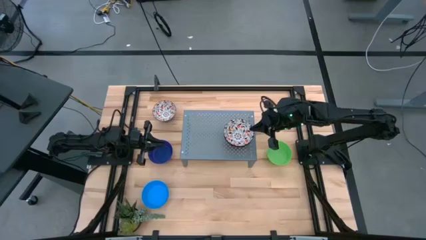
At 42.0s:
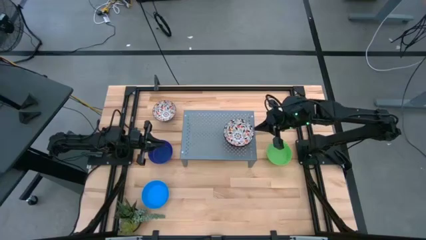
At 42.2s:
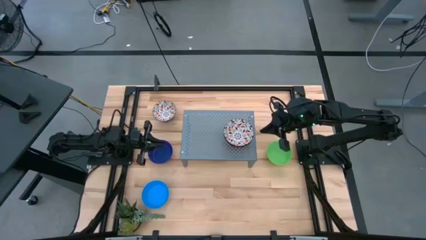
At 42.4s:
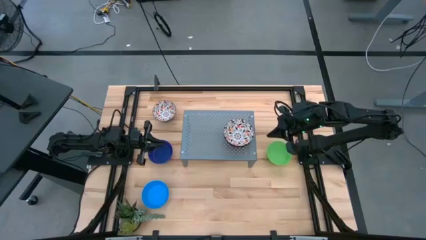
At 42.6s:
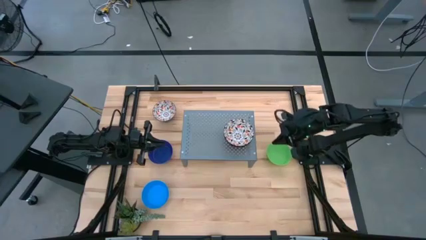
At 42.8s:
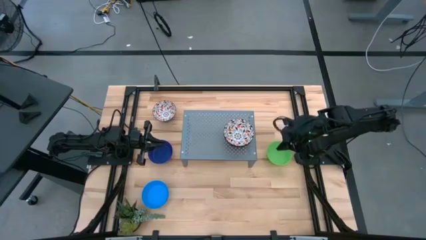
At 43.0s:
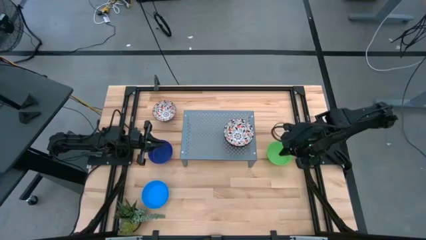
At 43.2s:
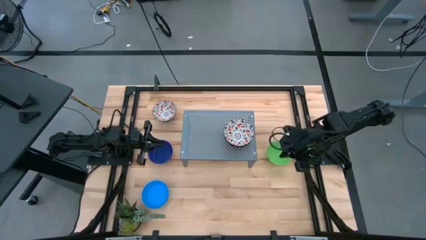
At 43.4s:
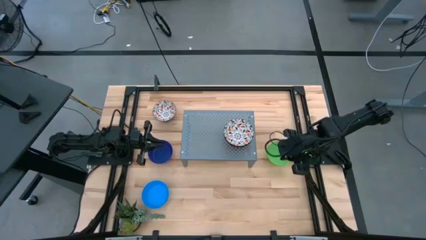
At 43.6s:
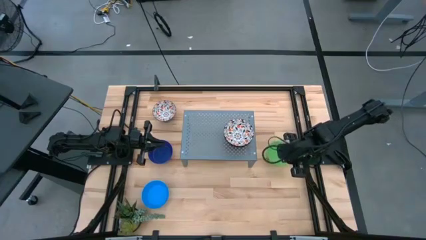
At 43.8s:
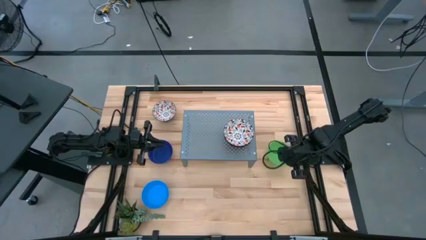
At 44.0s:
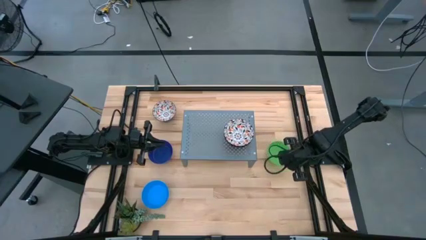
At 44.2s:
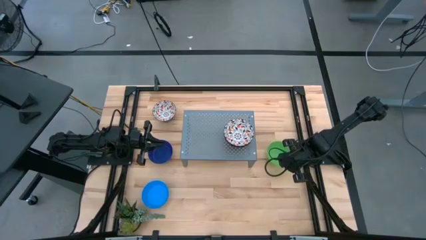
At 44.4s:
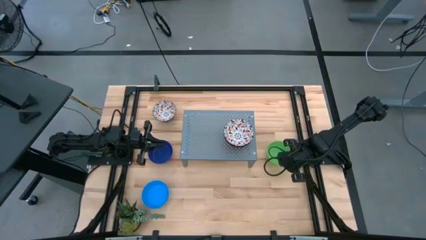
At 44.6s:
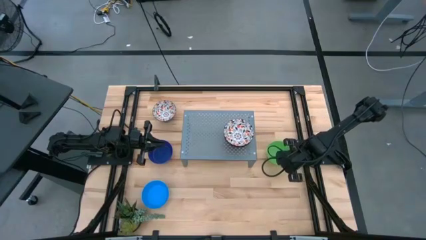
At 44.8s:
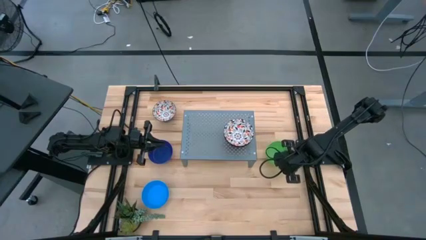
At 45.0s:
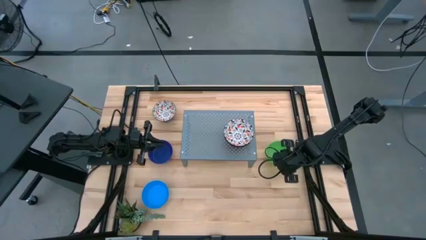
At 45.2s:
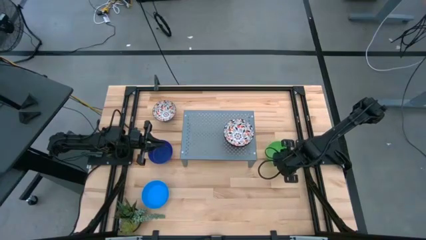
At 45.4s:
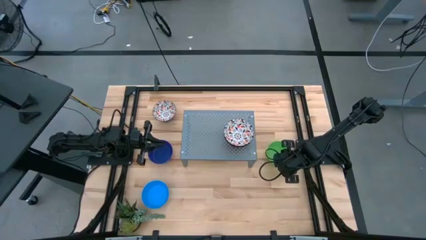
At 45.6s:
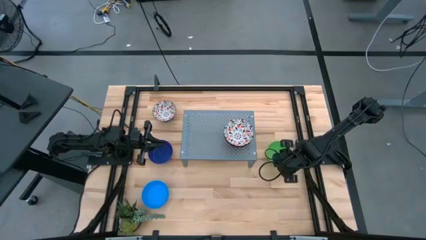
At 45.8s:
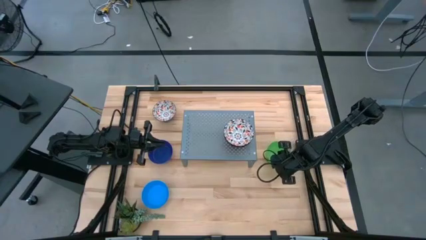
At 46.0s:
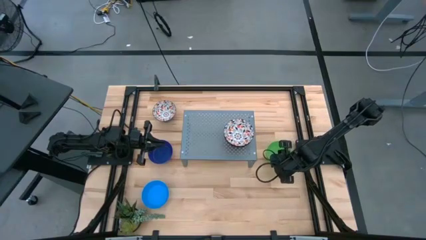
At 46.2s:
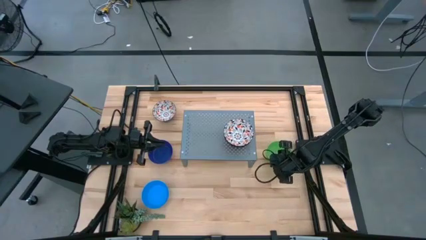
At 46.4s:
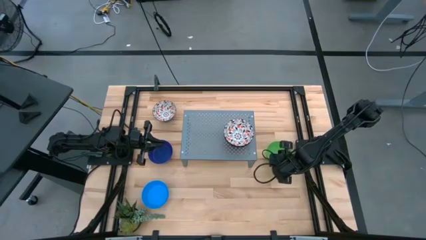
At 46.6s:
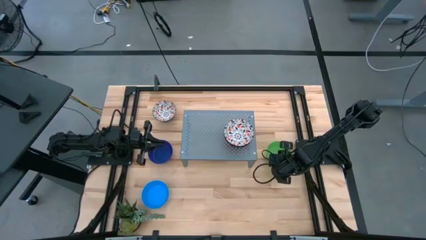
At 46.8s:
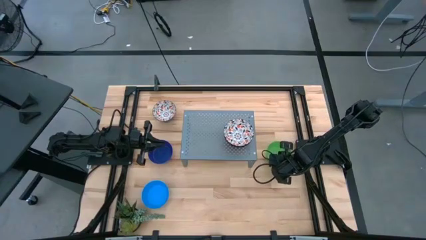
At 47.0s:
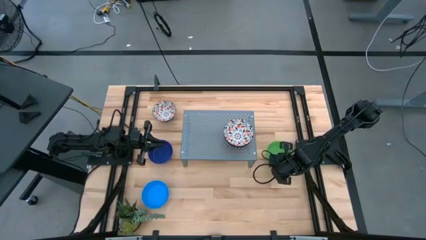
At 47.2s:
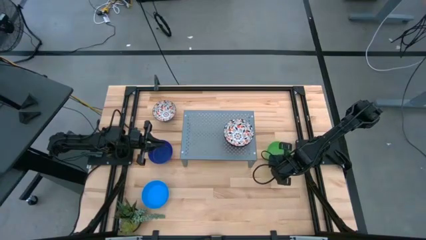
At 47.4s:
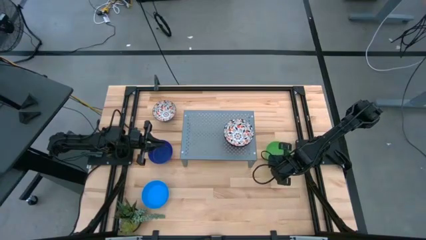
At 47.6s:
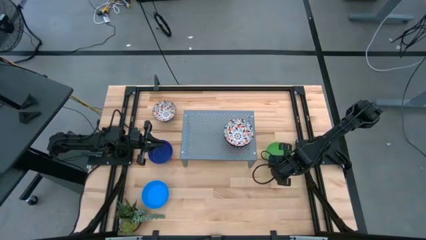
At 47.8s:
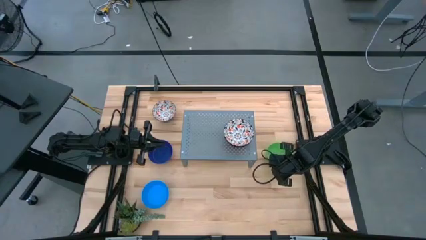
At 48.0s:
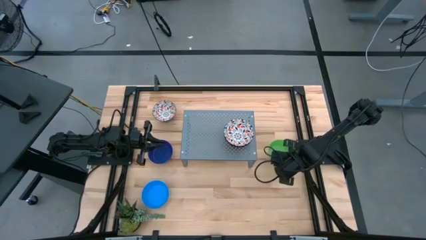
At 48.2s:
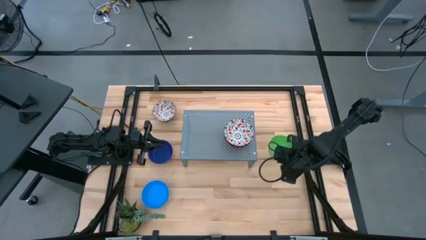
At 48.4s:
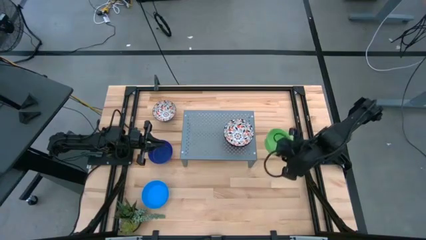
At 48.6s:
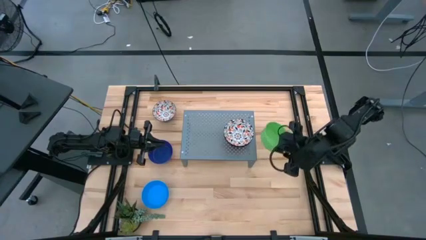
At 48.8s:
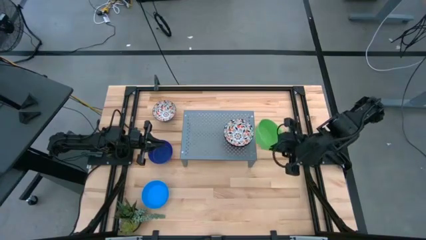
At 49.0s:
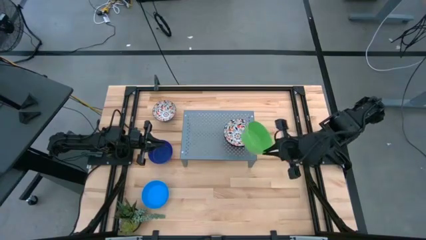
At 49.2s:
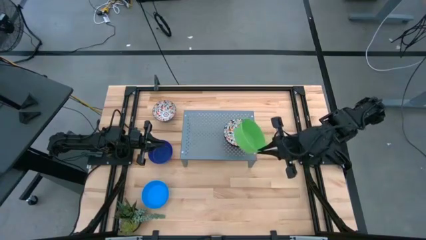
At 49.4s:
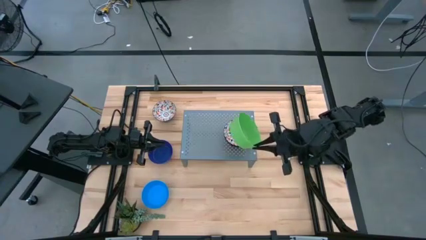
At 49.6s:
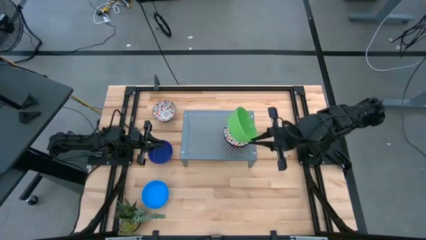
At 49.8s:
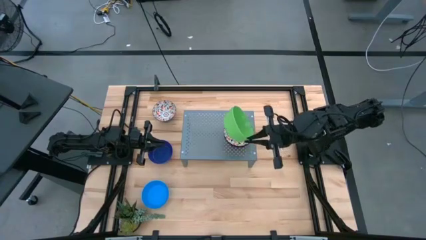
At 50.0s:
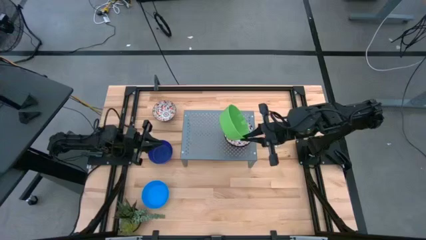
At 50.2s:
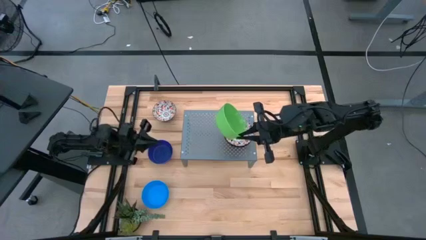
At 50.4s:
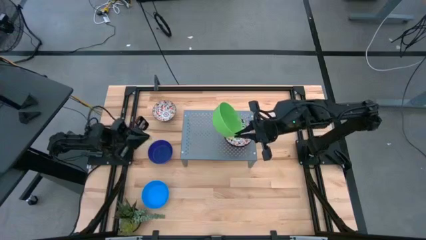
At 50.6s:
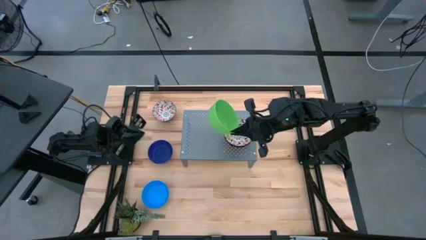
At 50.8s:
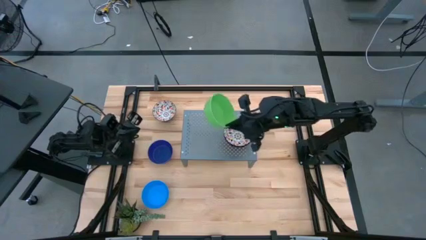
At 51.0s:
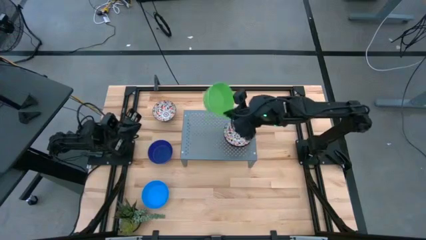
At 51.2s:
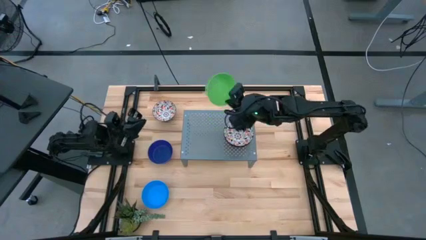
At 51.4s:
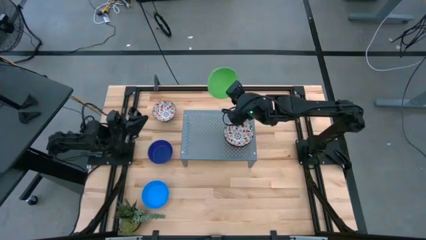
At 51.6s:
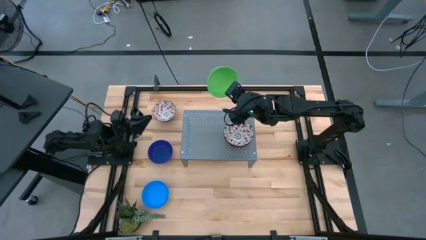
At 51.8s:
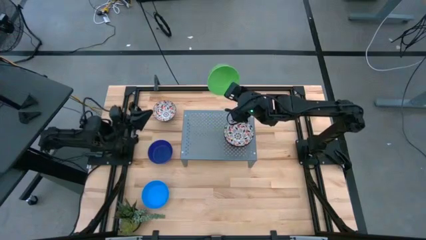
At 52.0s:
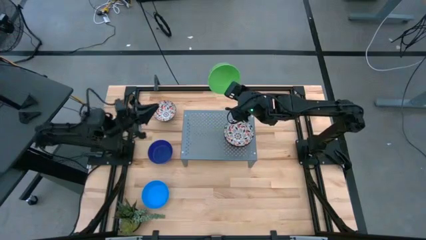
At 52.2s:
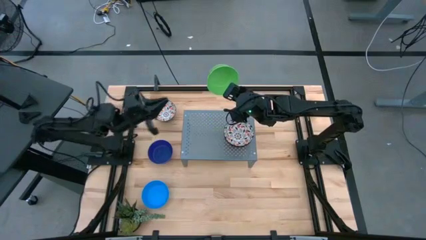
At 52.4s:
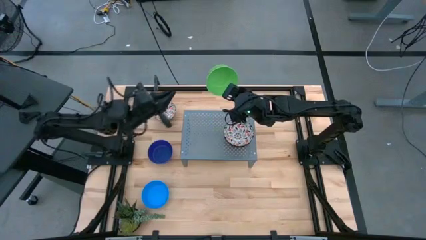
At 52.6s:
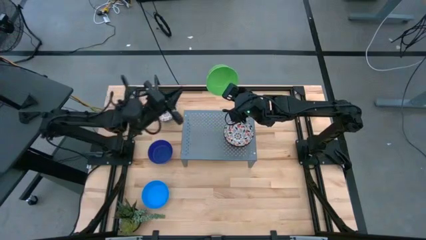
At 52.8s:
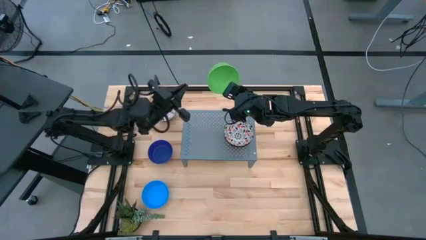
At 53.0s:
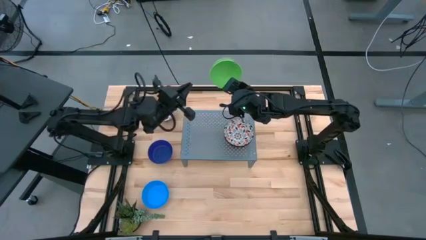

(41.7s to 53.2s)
Task: Pick & Place Mini bowls
Put the green bowl on the shelf

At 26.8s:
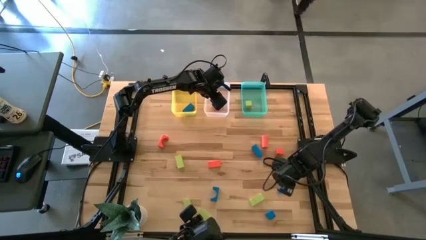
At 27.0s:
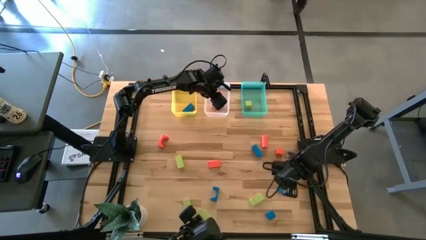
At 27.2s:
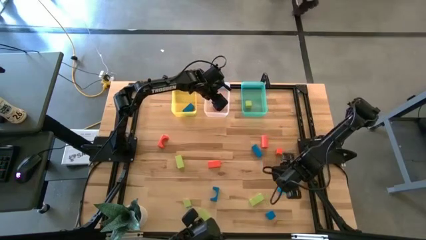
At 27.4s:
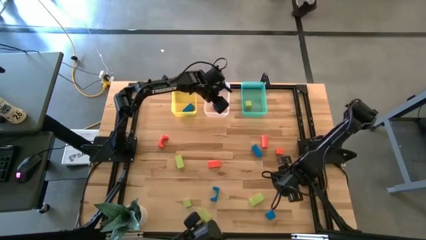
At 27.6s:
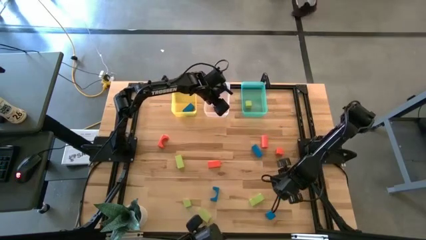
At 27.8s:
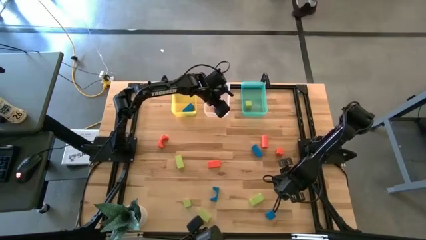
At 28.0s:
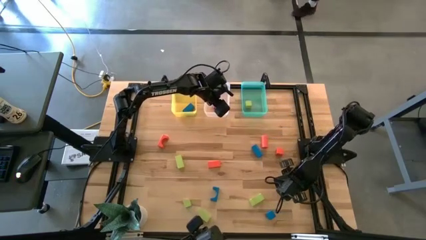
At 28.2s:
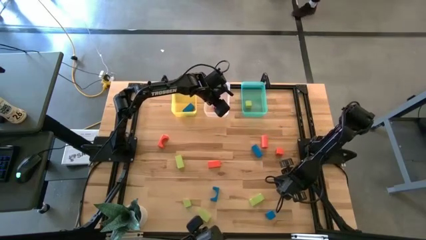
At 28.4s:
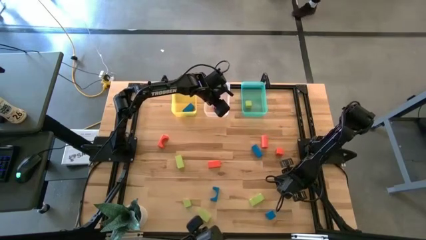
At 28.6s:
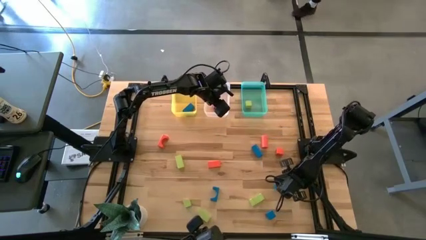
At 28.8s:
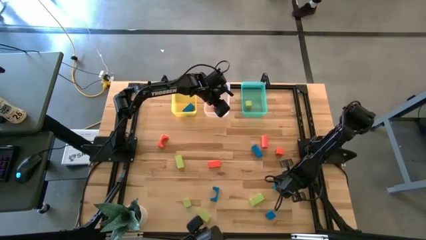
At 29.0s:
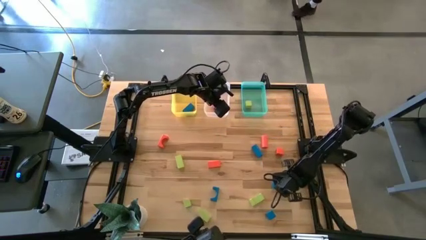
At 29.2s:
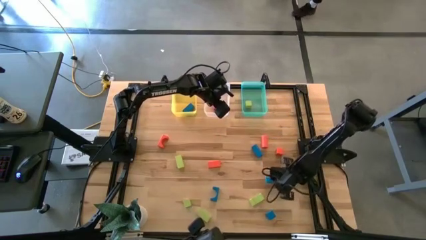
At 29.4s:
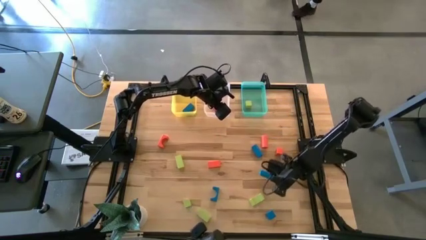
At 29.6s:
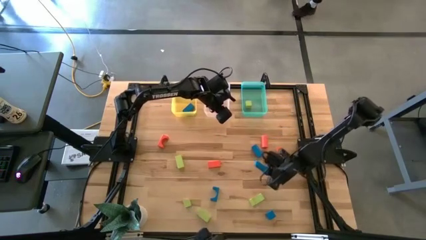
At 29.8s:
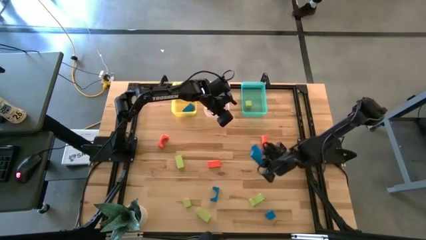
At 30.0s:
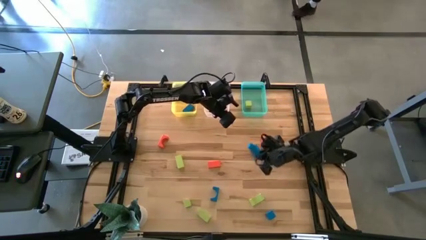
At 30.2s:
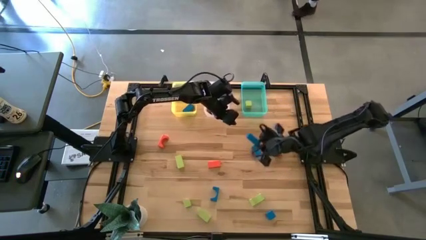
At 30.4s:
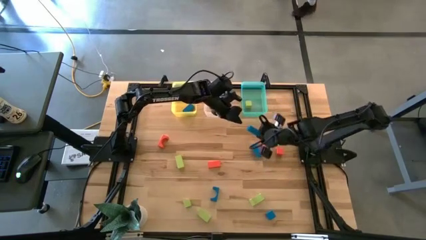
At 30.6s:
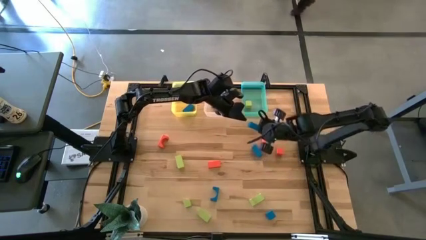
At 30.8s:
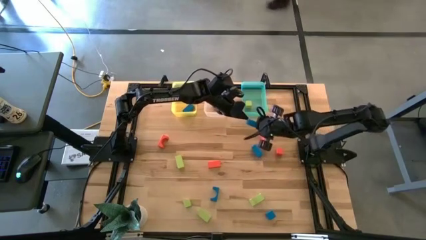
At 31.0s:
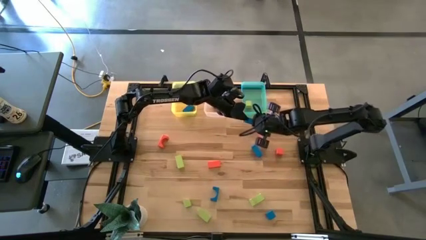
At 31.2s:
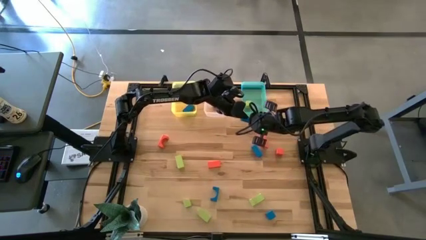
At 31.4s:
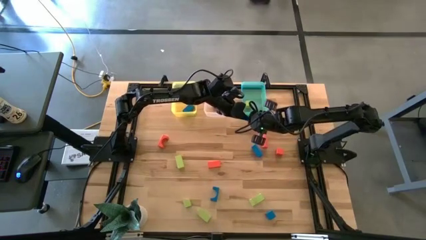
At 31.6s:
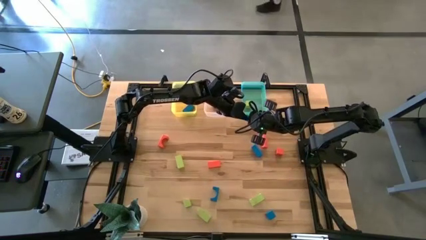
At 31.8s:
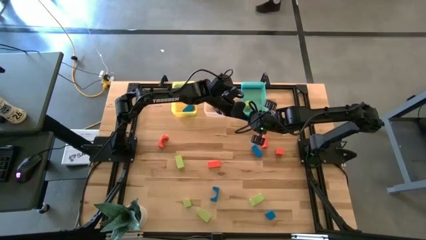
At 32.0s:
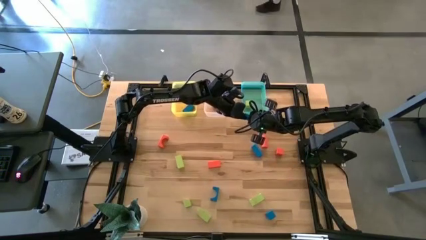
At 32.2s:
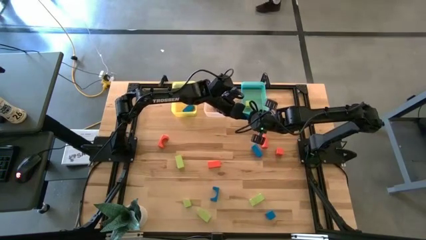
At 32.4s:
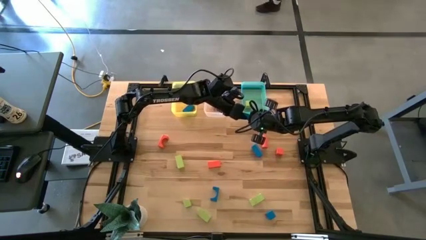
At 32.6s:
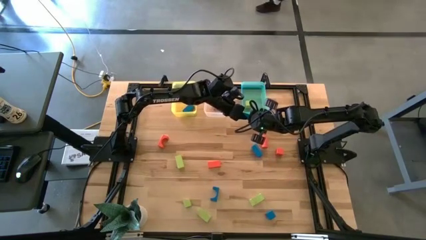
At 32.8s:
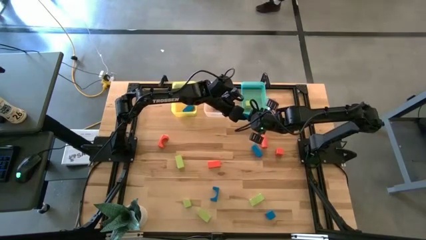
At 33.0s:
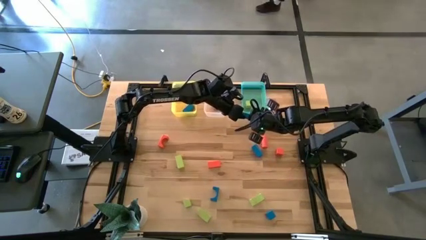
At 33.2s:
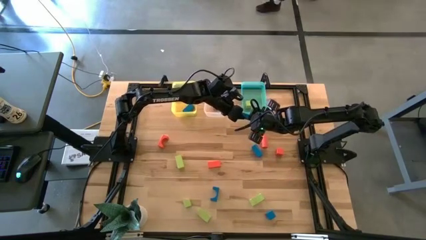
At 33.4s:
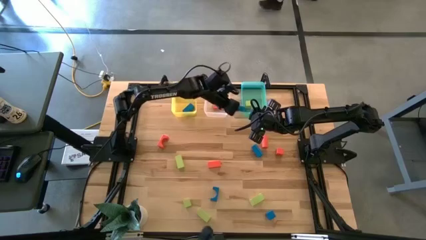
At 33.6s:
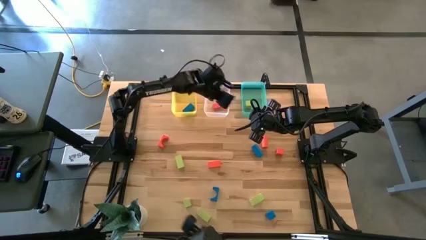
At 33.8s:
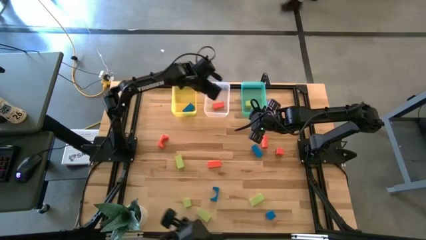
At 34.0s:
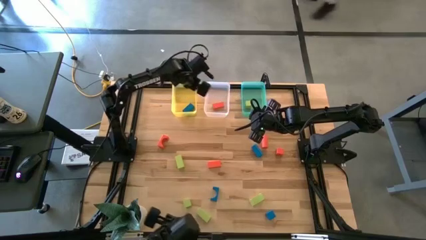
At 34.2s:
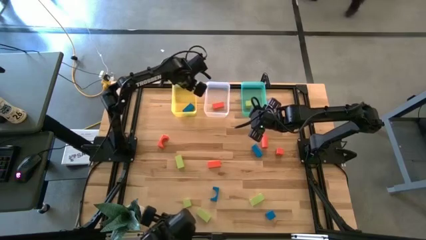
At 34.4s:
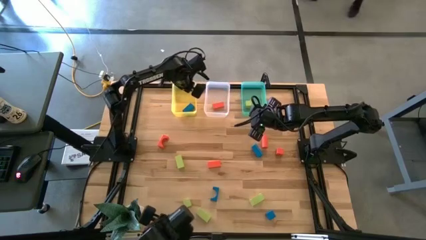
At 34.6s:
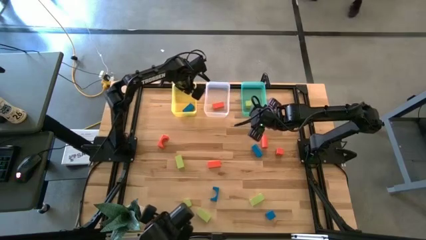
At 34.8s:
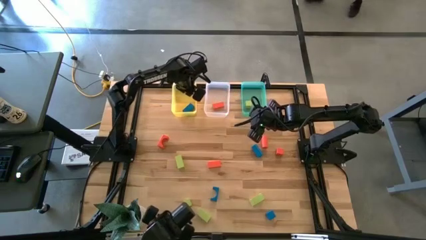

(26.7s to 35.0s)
Task: Sort & place blocks by color
Put the blue block into the yellow bin
